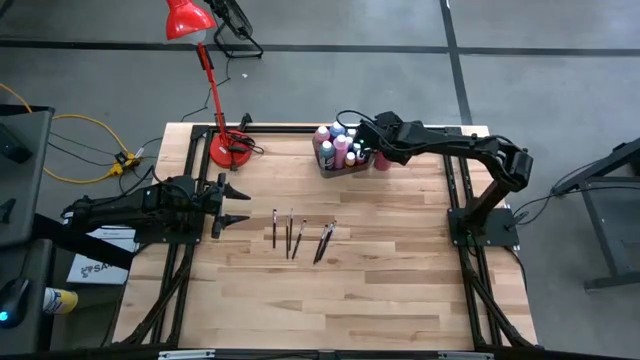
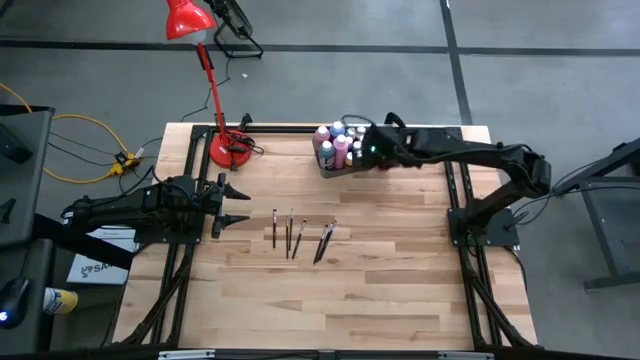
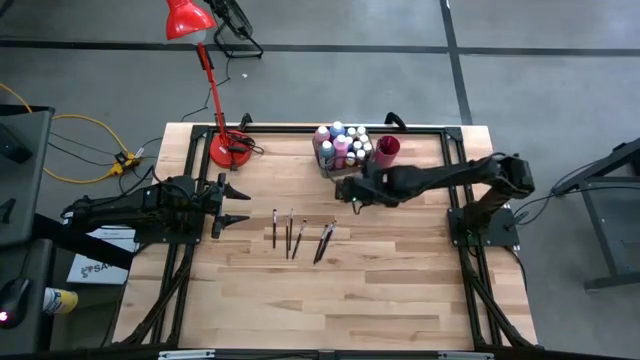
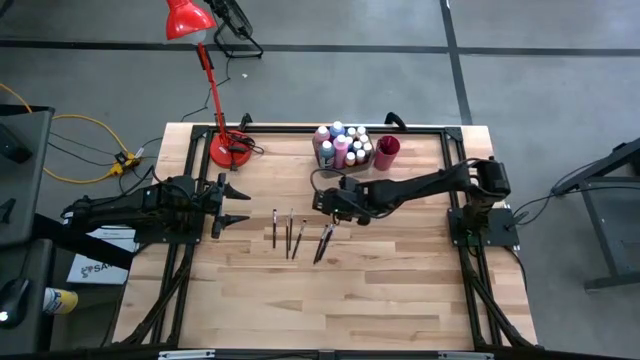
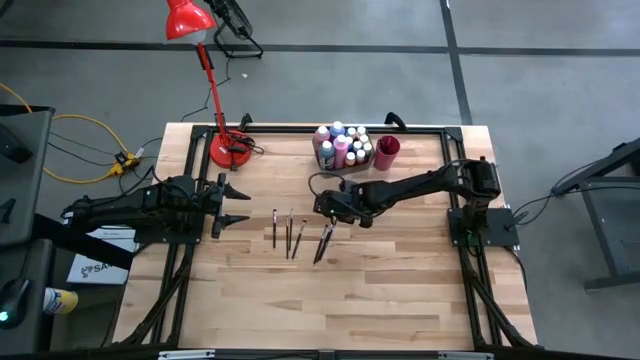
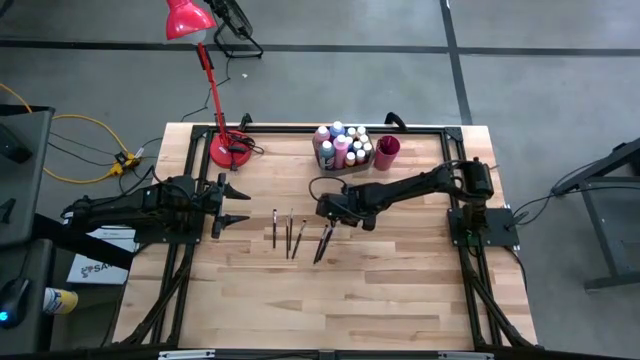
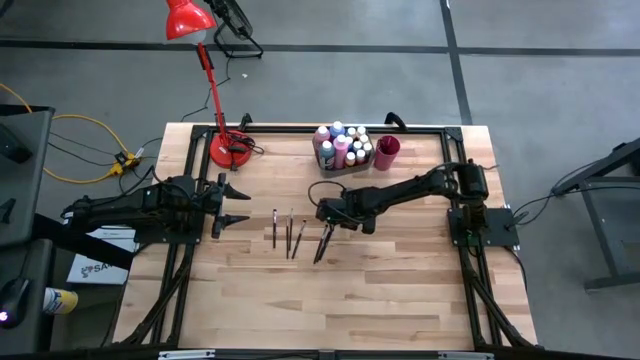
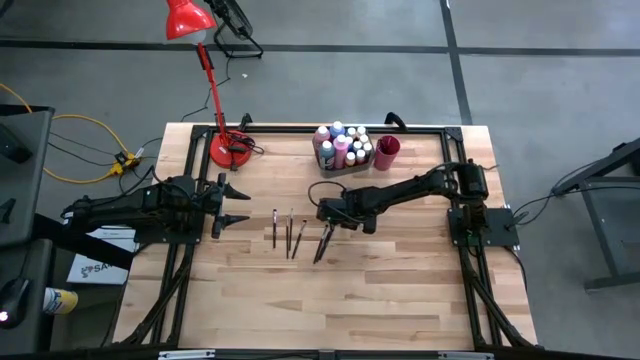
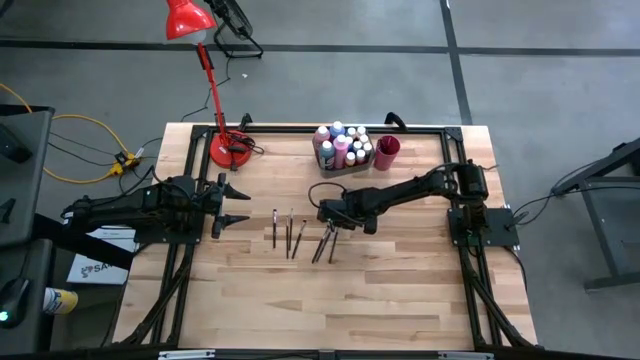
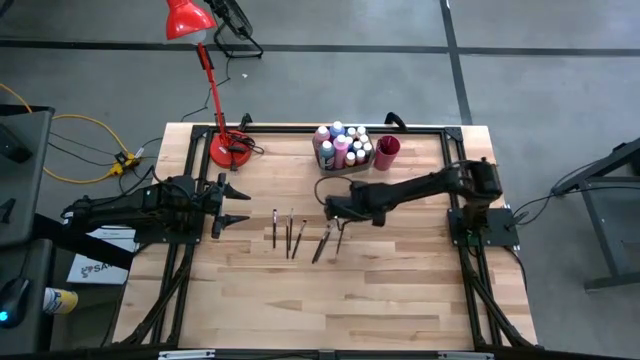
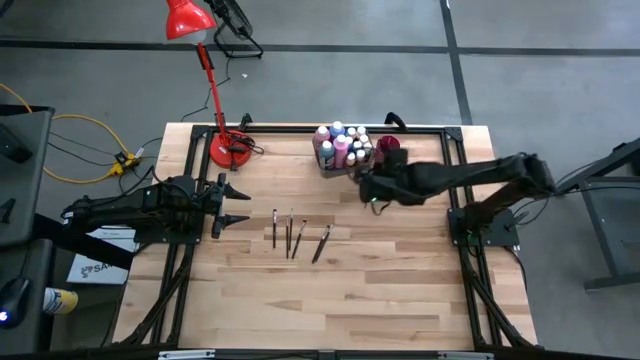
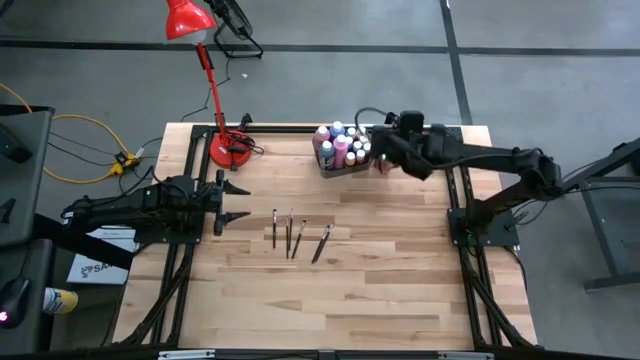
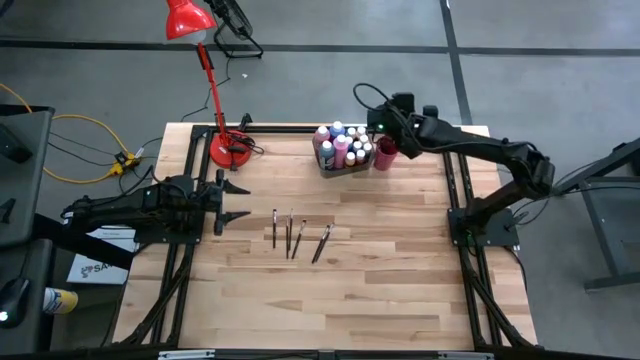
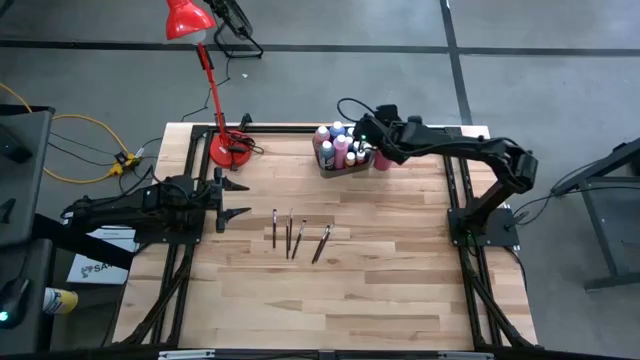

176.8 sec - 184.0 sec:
Task: Pick & Place Paint Supplies
Put the black paintbrush into the red cup

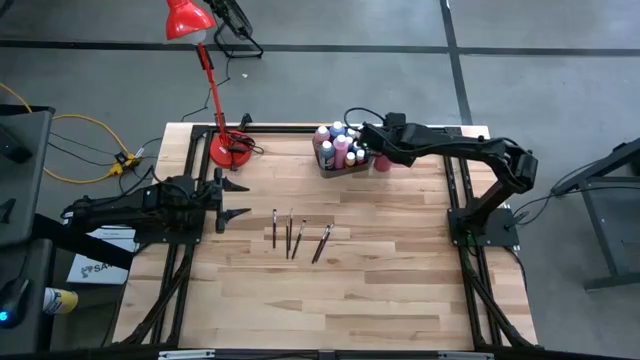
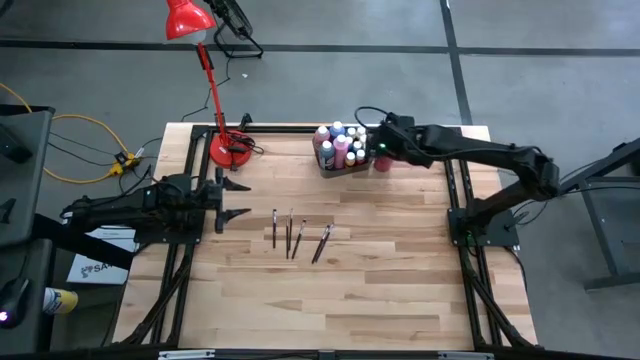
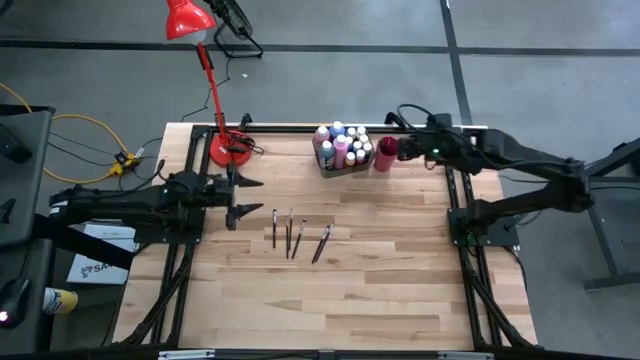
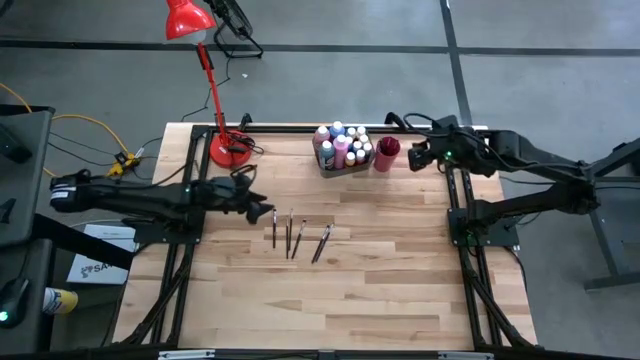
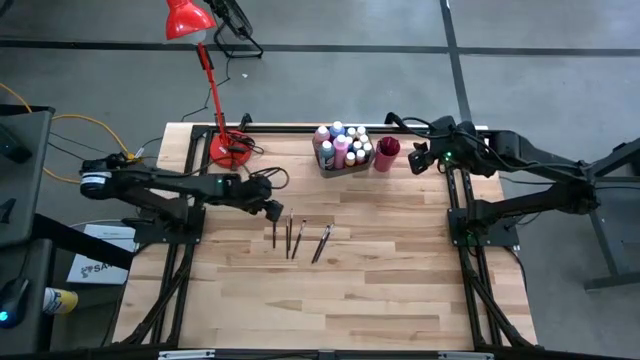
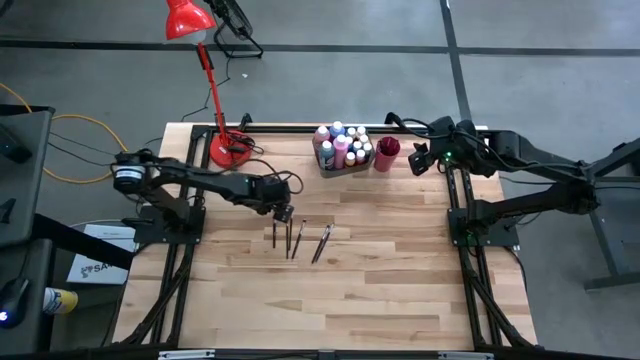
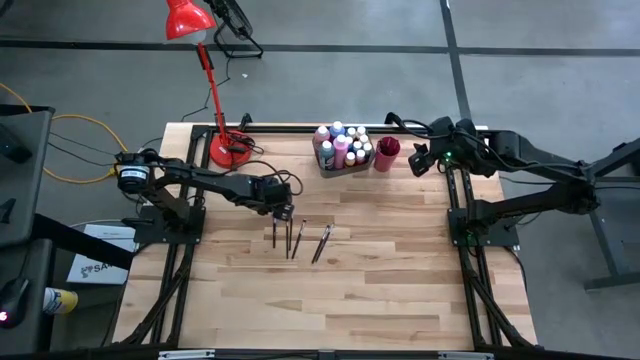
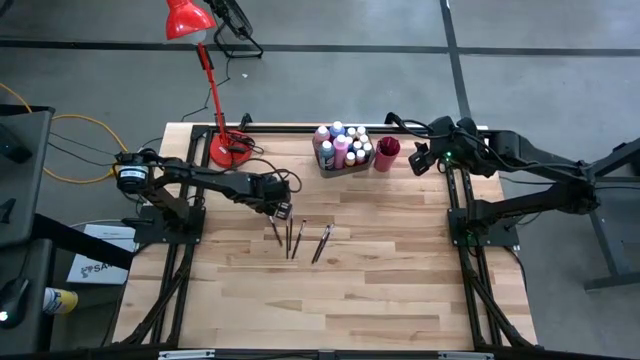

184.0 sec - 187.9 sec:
Put the black paintbrush into the red cup

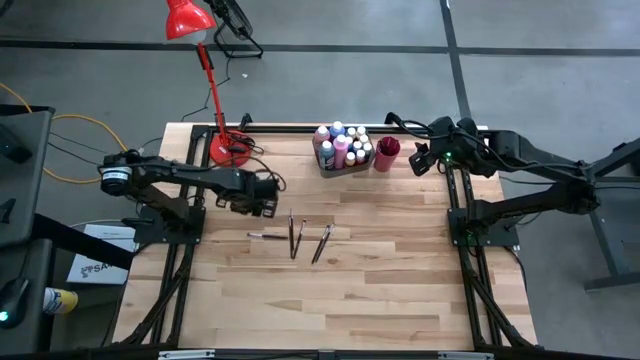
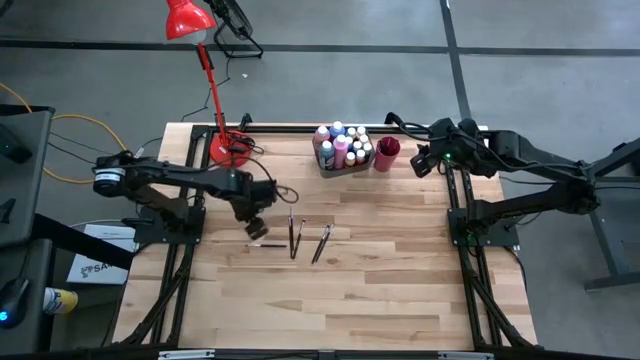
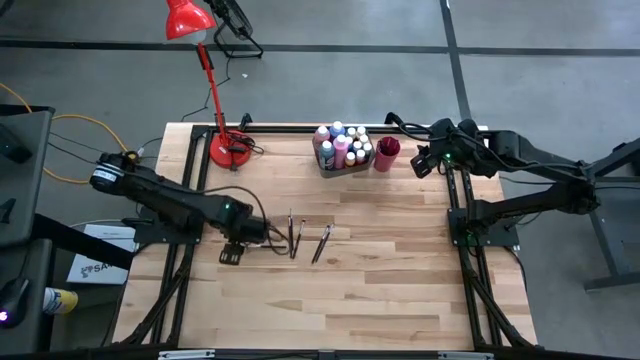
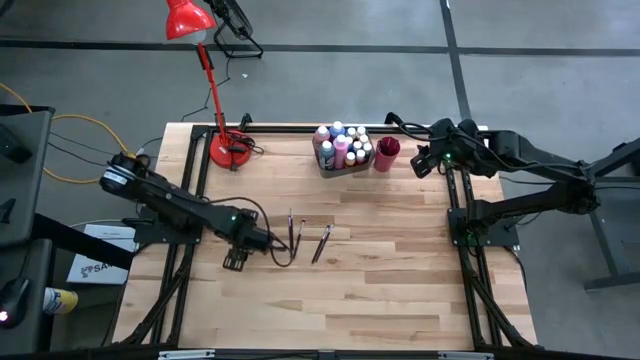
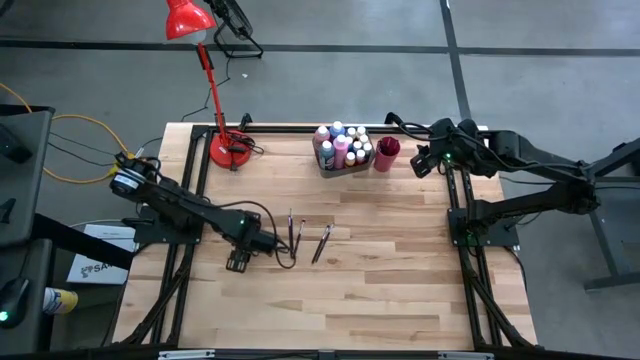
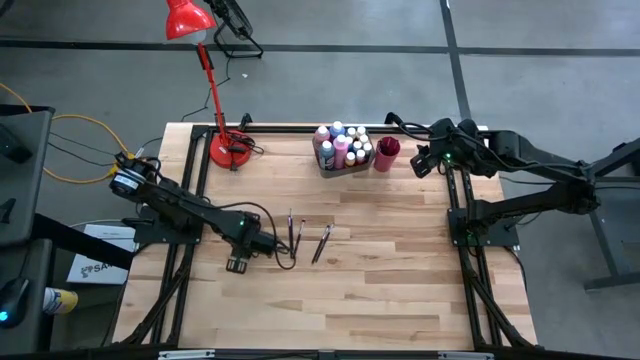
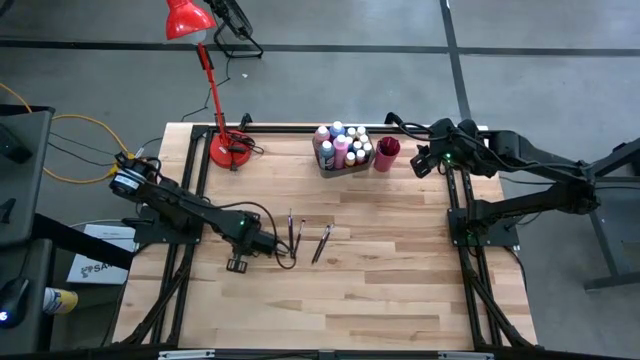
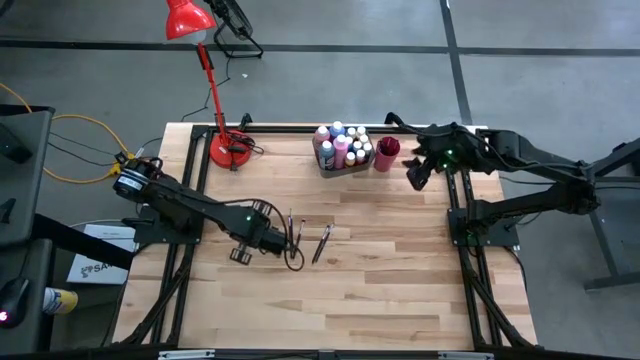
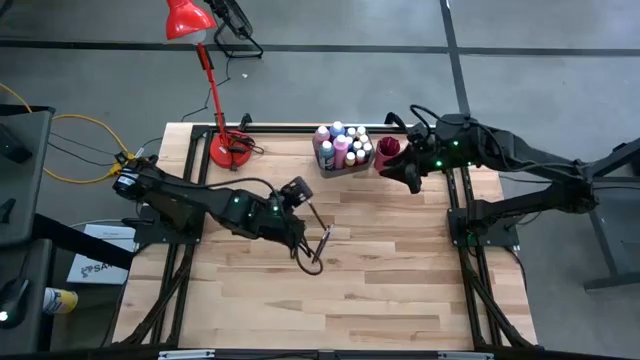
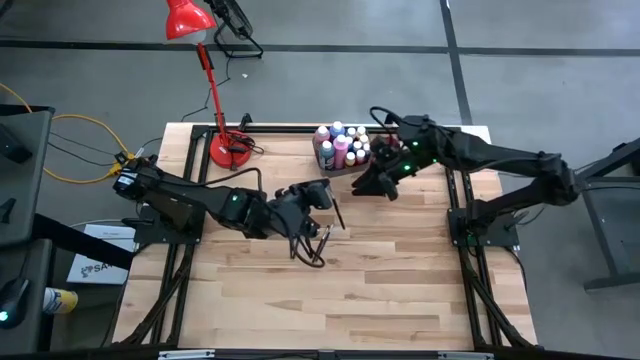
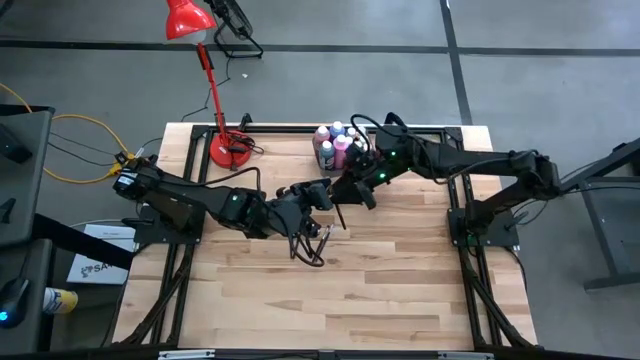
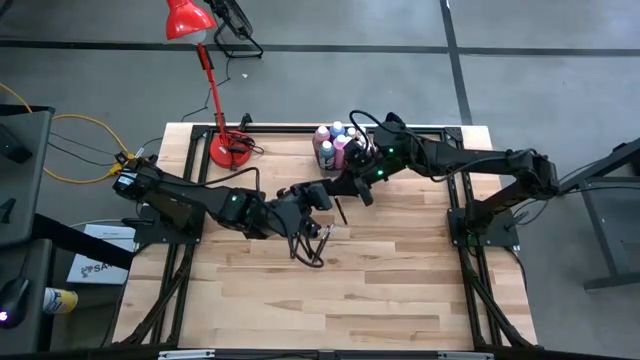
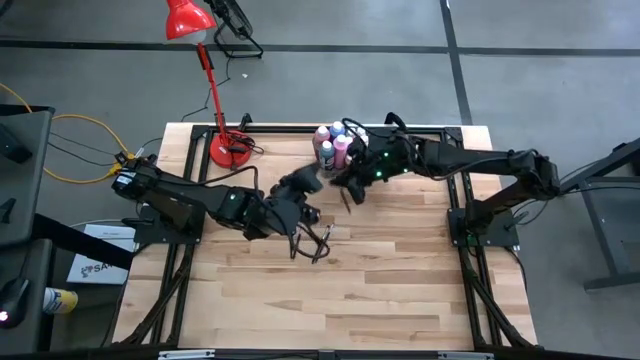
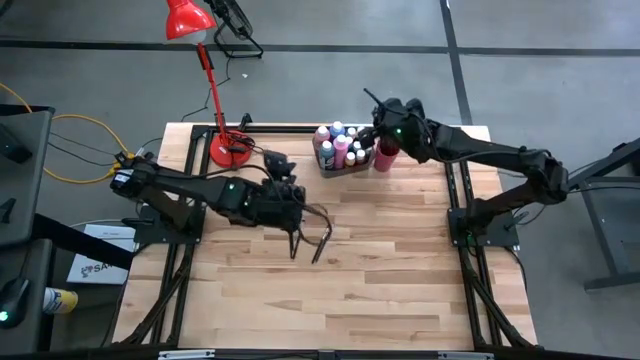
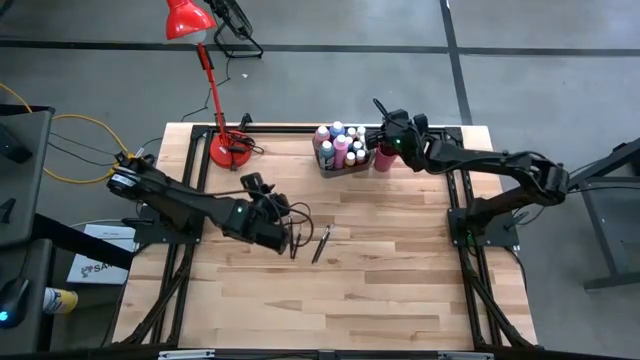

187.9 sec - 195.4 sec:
Put the black paintbrush into the red cup

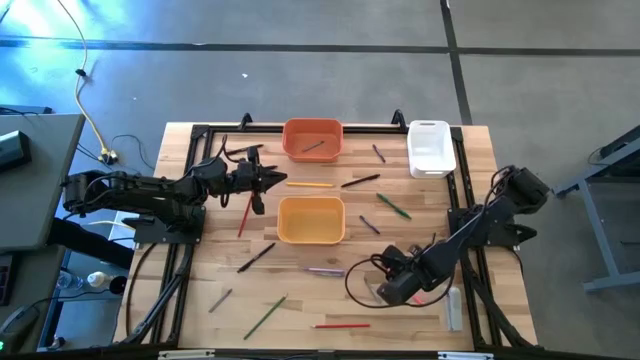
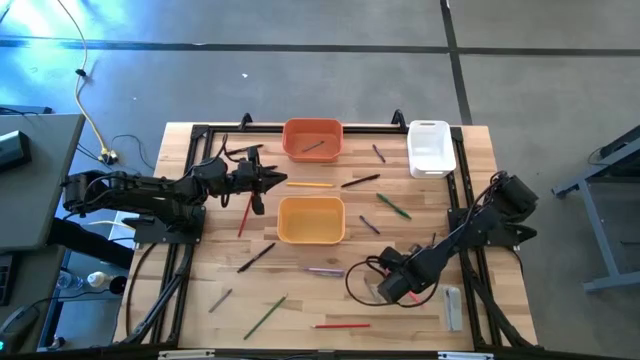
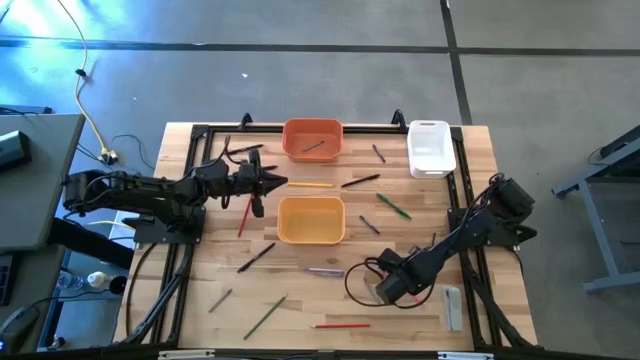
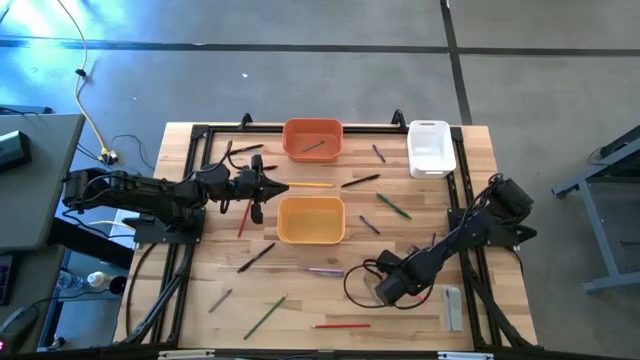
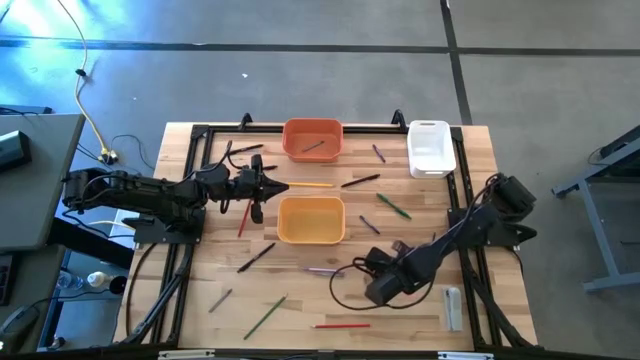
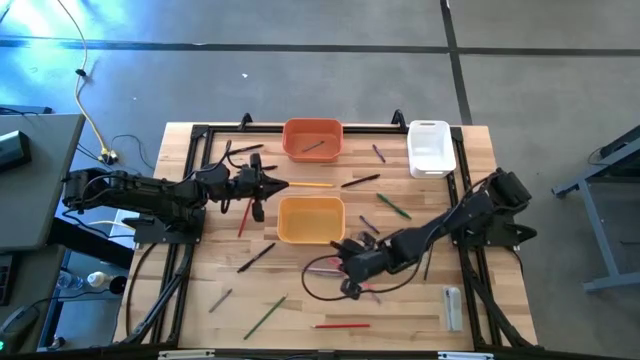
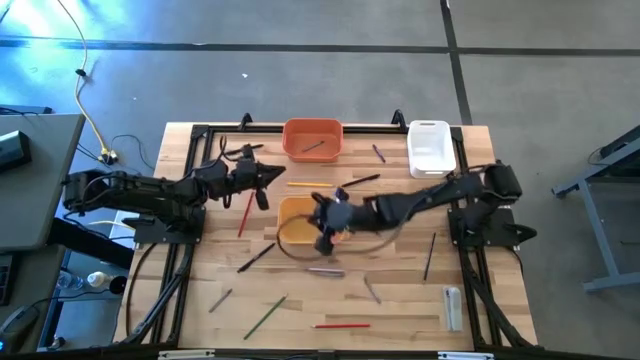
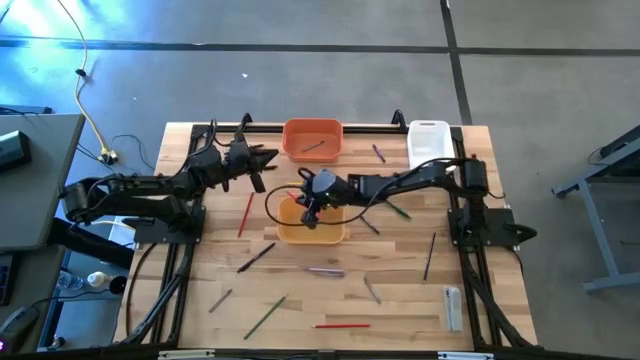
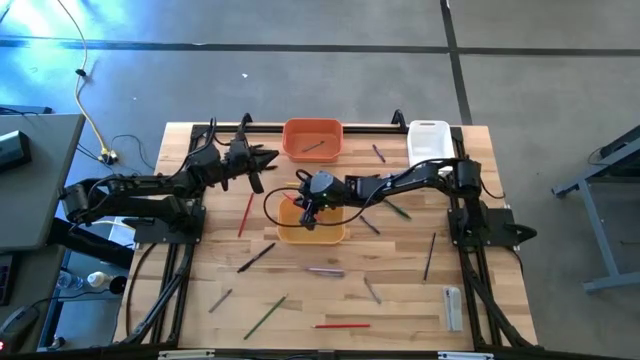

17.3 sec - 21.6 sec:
Task: Sort crayons/erasers/pens/pencils in bins
Put the pink pencil into the yellow bin
